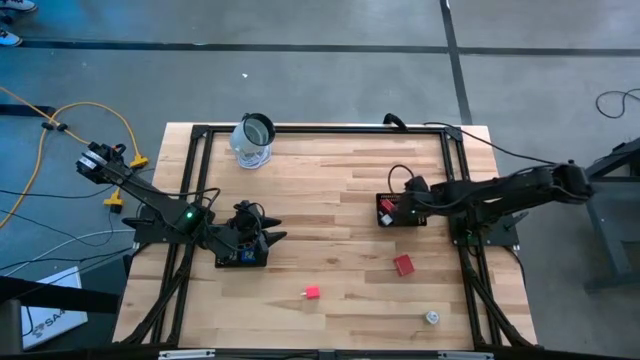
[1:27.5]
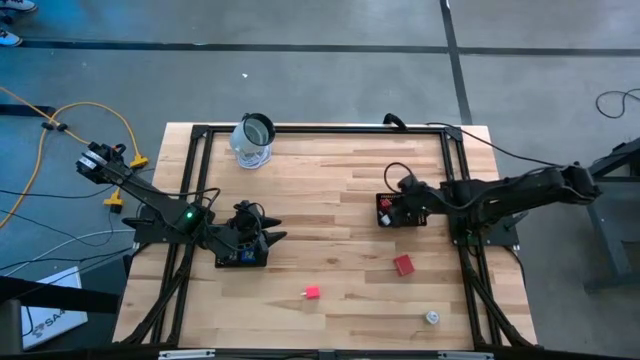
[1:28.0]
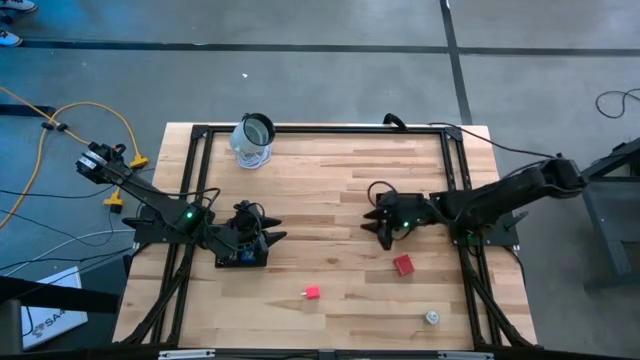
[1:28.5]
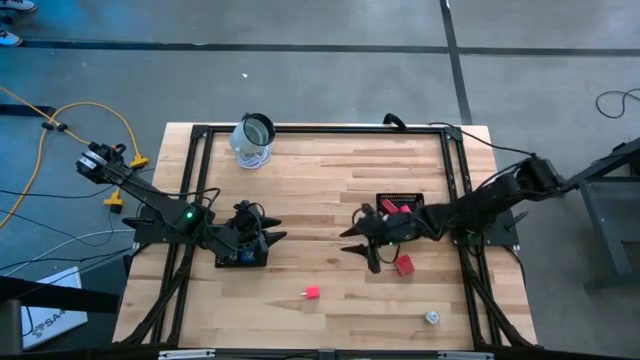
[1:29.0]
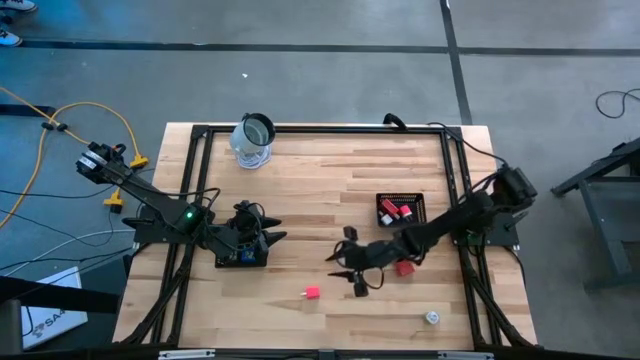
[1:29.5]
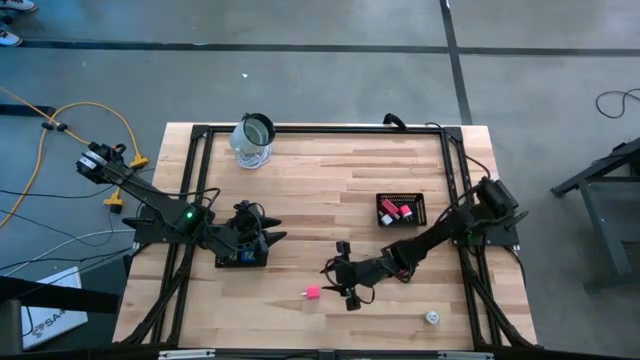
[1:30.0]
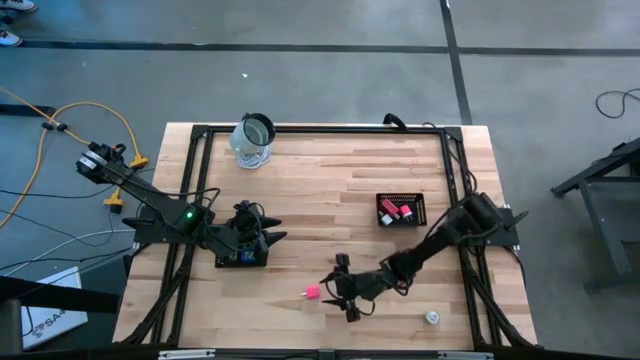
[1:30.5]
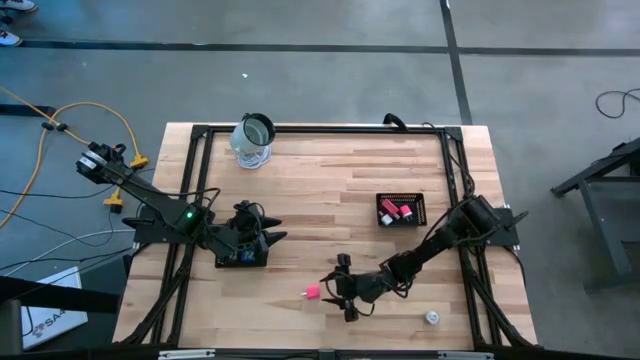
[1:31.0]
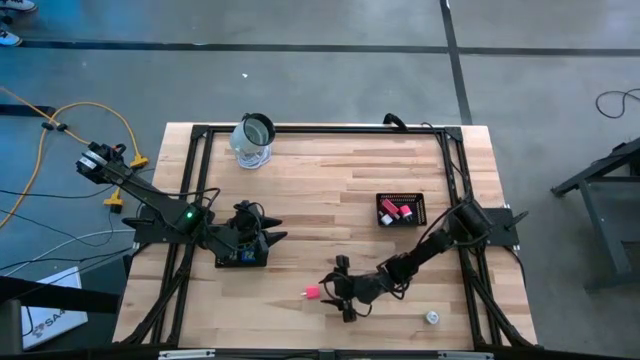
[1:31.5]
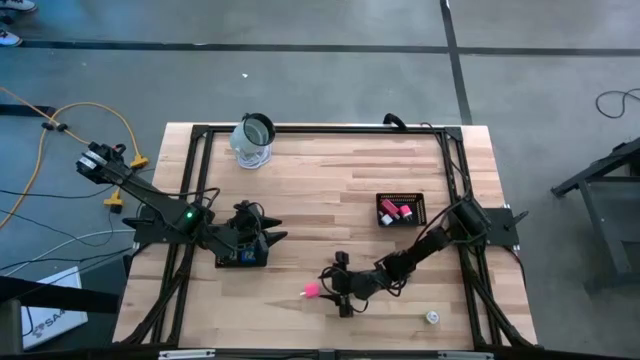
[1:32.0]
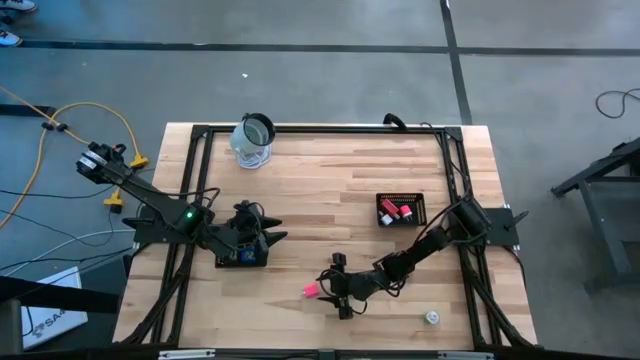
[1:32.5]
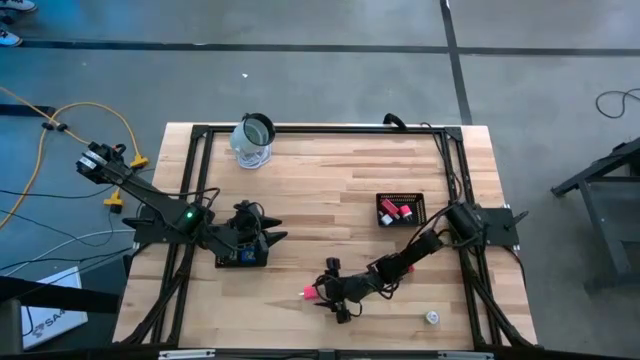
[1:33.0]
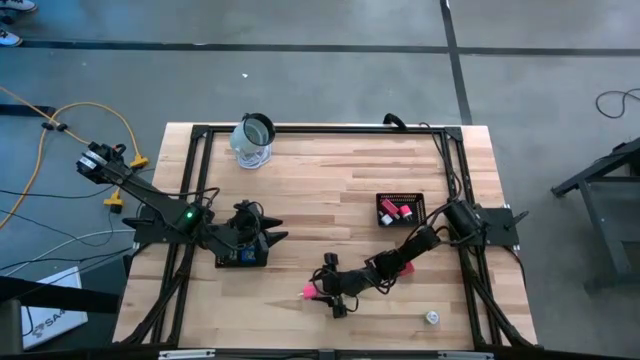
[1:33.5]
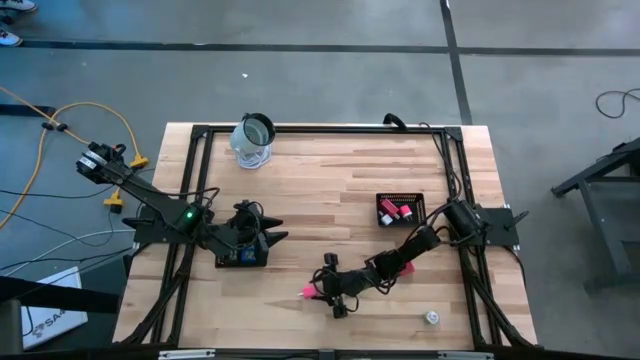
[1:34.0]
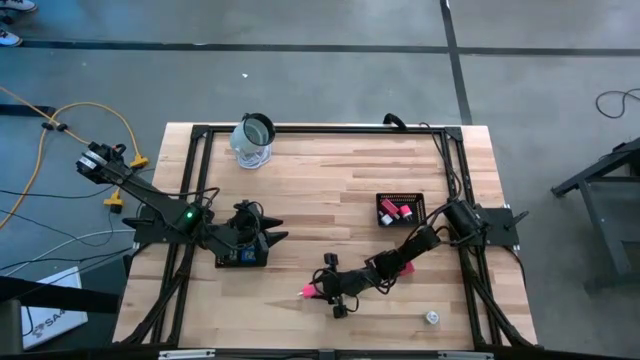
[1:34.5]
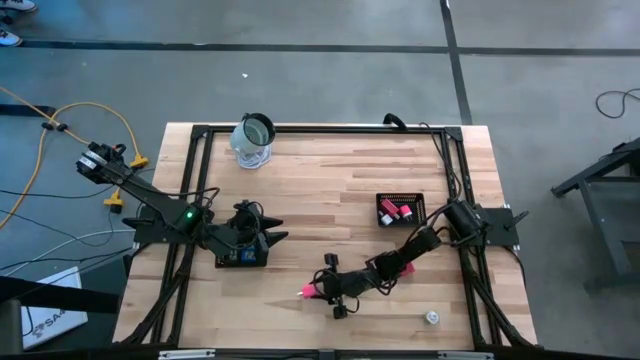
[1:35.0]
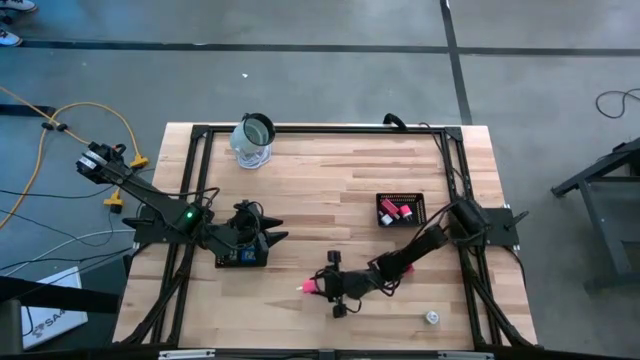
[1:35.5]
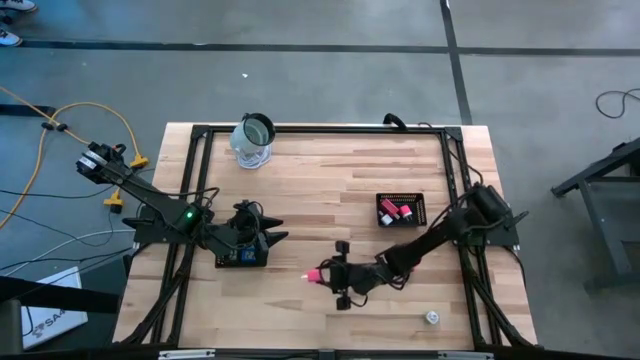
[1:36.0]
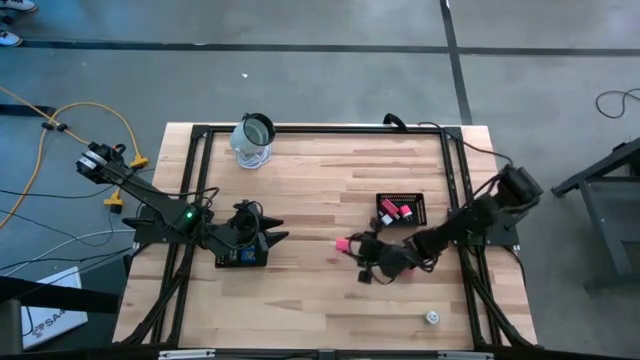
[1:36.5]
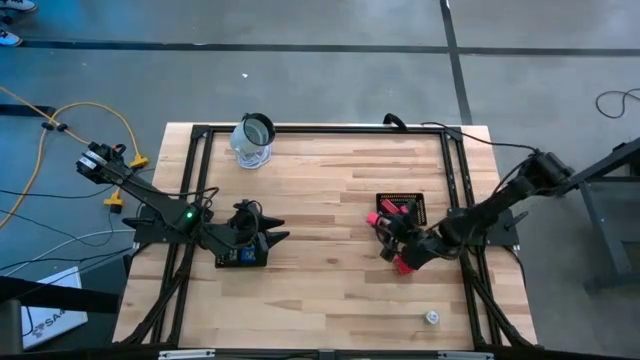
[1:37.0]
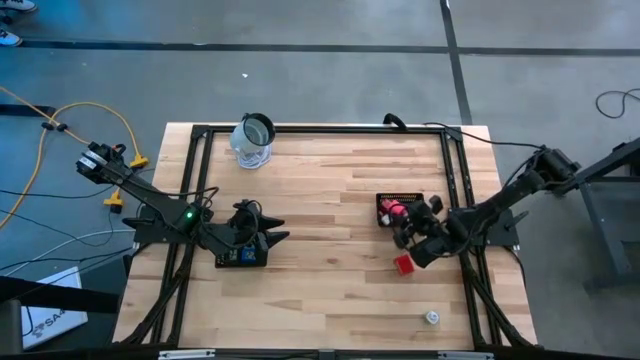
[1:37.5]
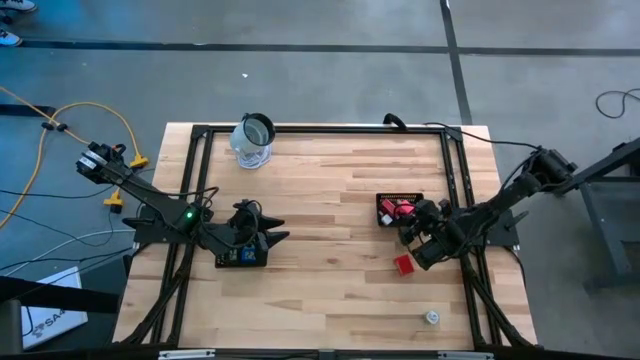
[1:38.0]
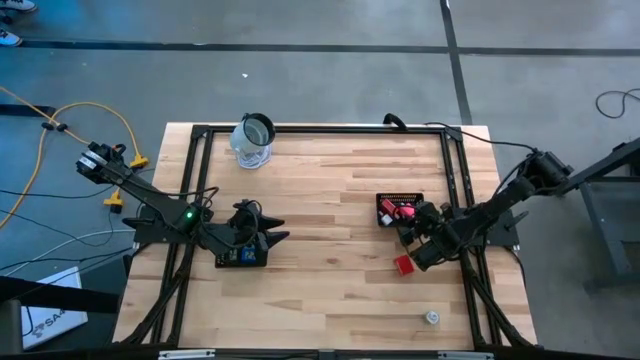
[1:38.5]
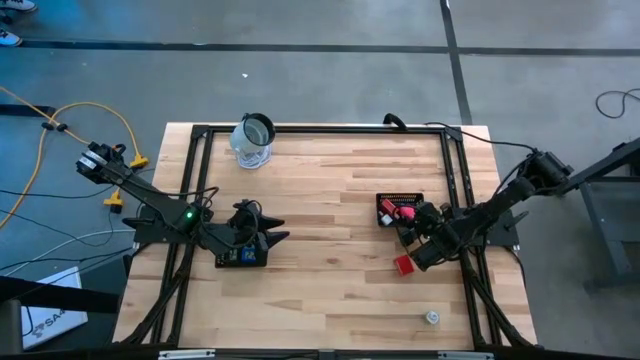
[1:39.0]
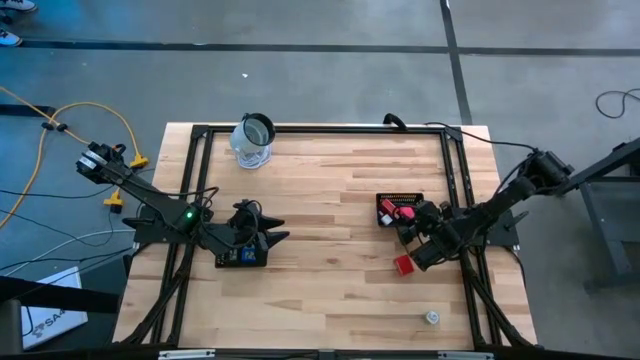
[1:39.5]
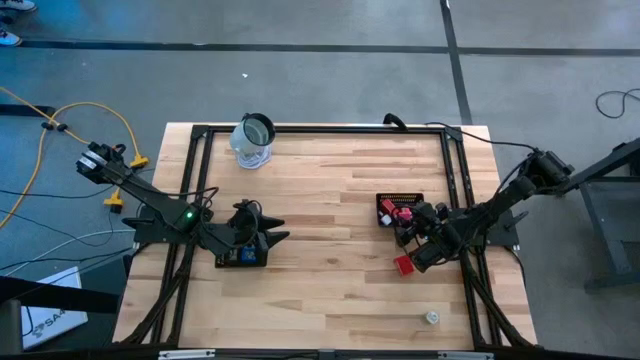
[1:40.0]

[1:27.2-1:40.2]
Task: Pick & Place Office items
Put the pink charger adapter into the right black bin

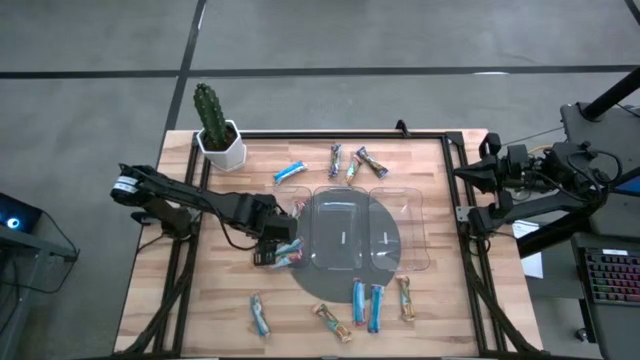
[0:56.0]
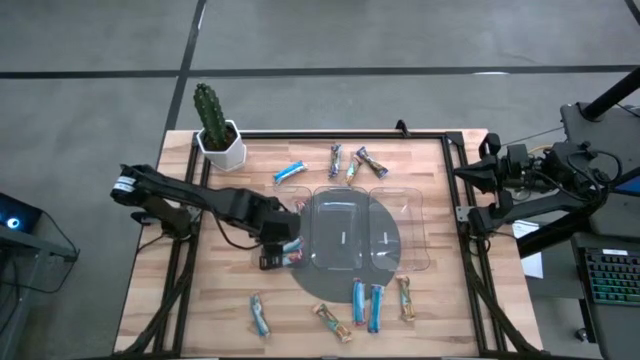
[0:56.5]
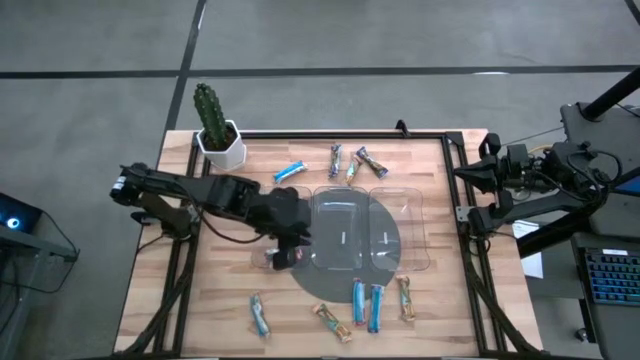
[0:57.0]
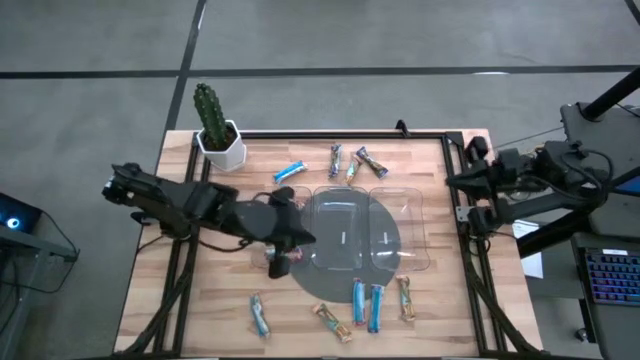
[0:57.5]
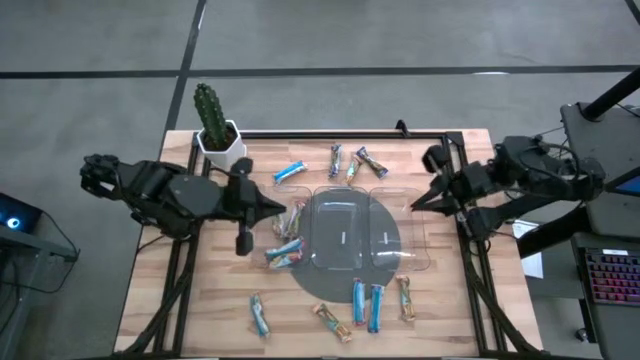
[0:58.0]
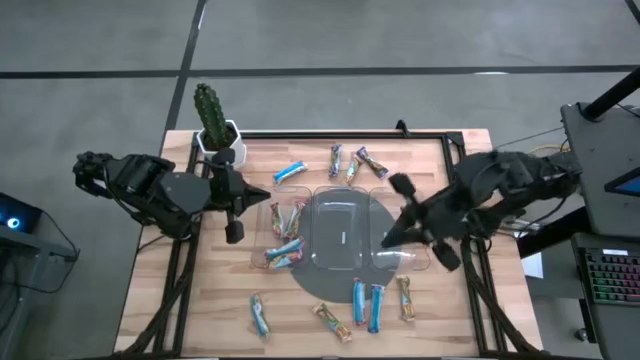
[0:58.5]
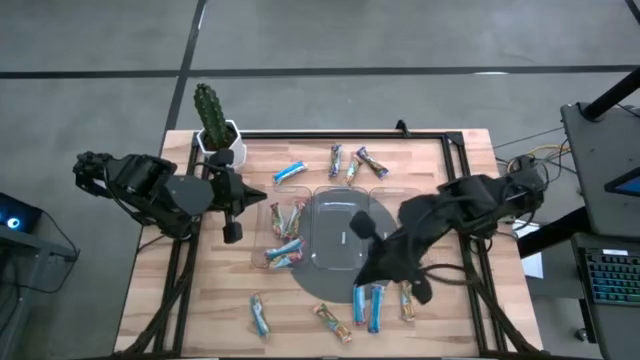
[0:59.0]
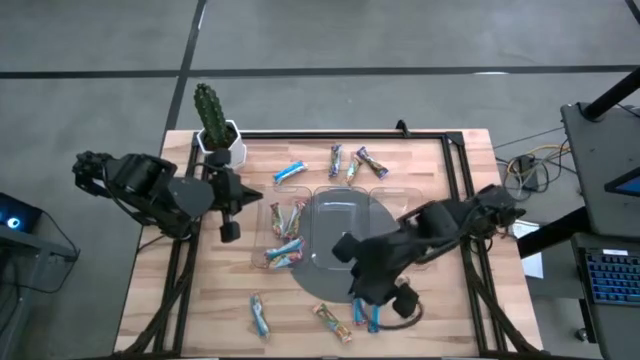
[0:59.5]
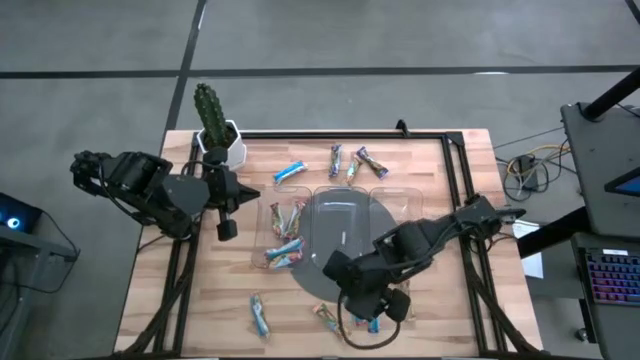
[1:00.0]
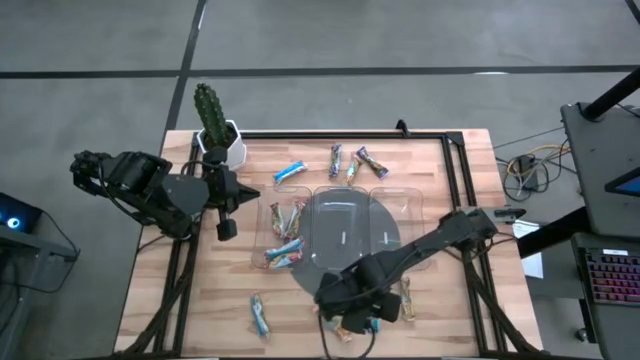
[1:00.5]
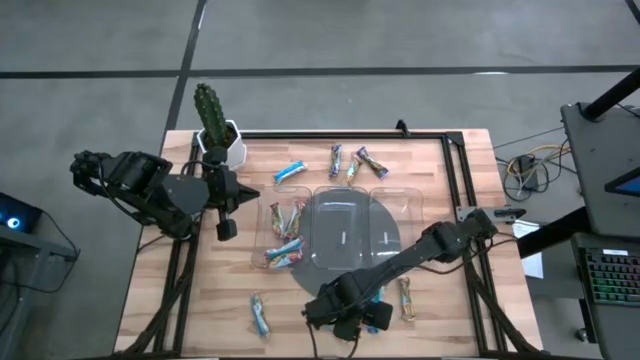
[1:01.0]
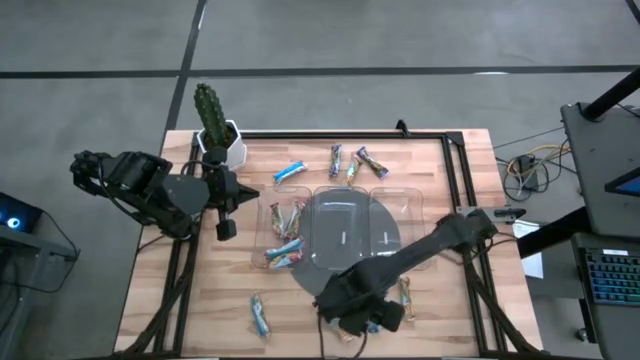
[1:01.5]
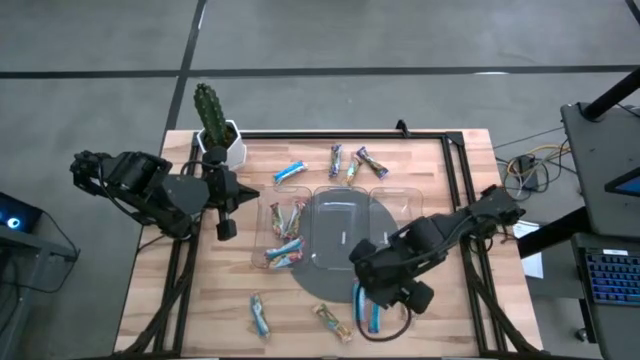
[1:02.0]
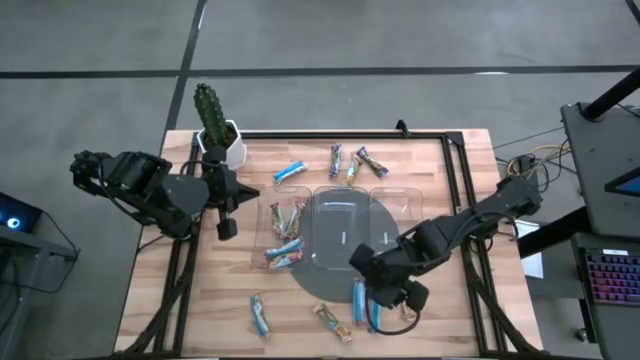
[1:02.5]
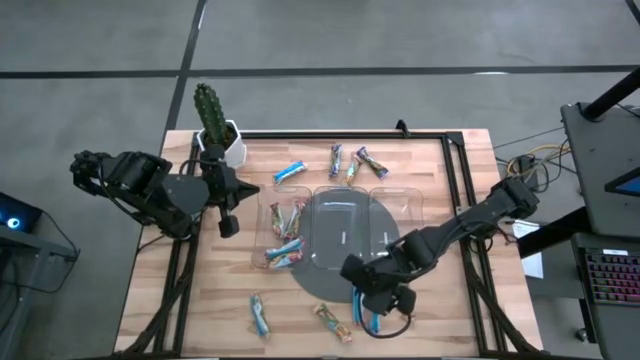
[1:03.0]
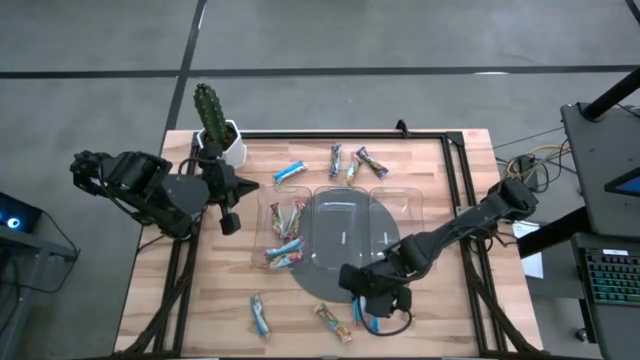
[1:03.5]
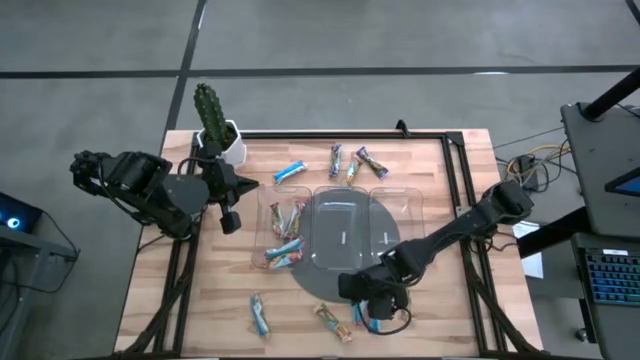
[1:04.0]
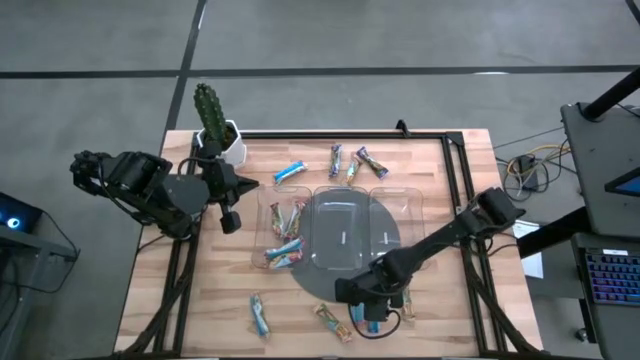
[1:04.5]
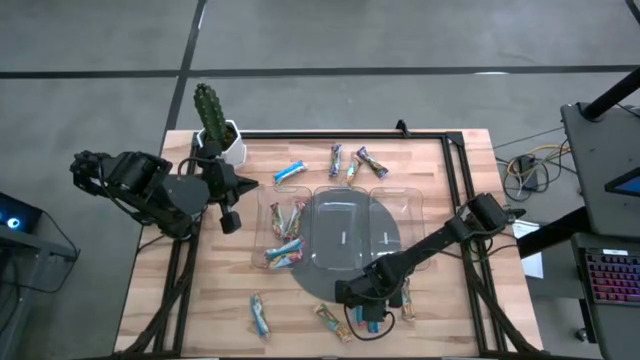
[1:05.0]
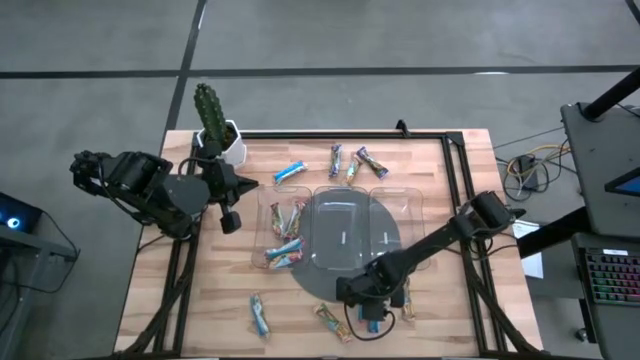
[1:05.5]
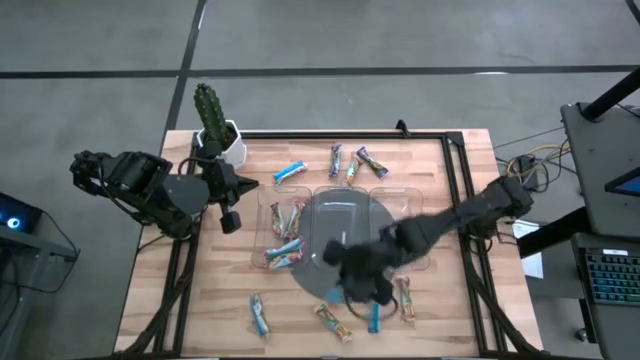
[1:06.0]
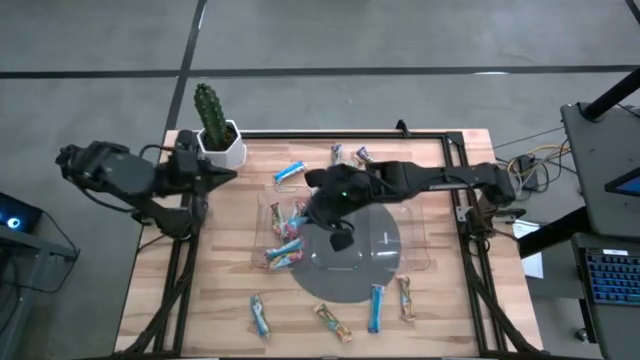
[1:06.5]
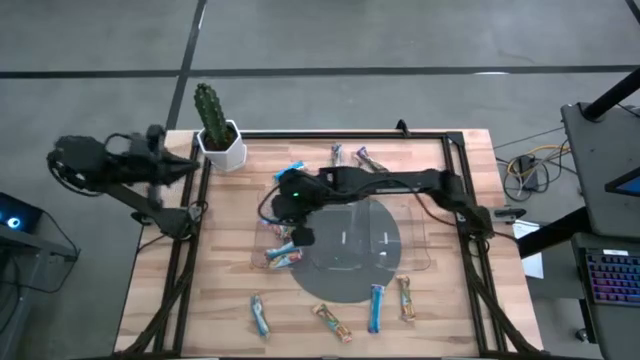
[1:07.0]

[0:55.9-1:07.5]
Task: Pick and place Granola Bars by type
Put the red granola bar into the left transparent bin
